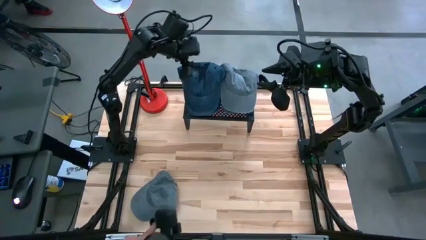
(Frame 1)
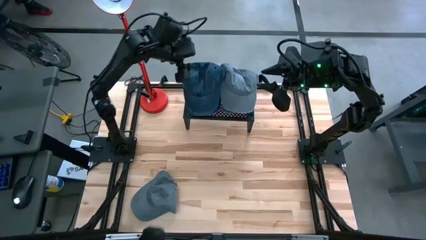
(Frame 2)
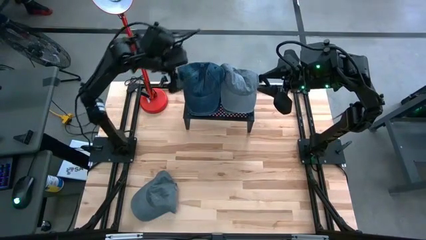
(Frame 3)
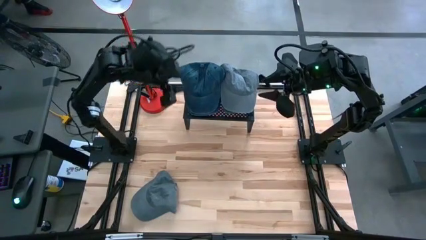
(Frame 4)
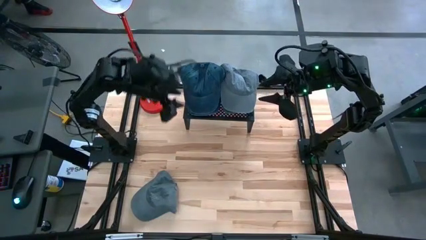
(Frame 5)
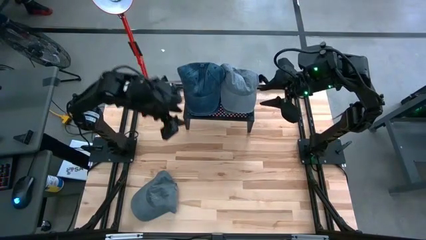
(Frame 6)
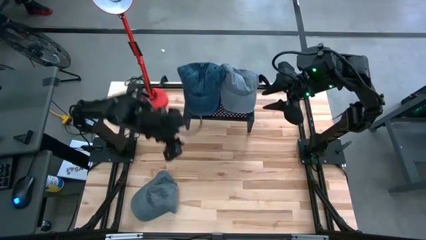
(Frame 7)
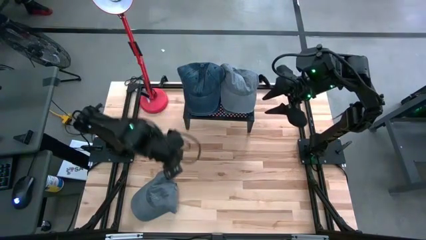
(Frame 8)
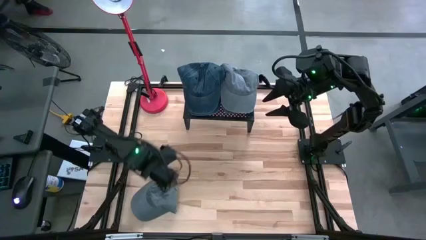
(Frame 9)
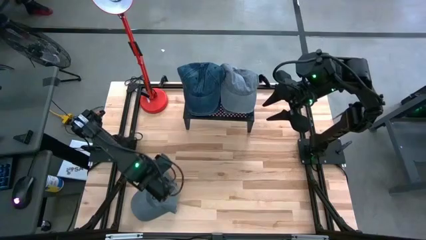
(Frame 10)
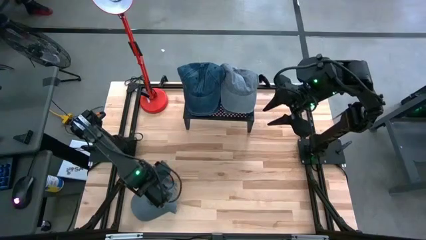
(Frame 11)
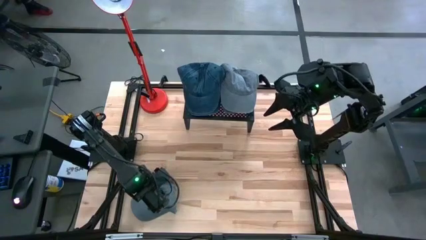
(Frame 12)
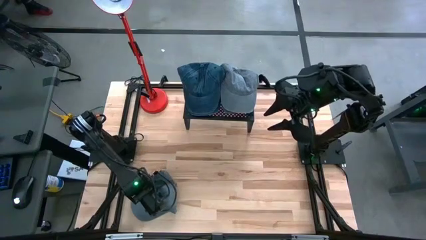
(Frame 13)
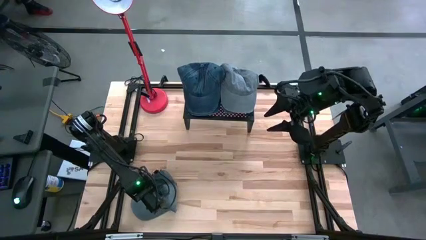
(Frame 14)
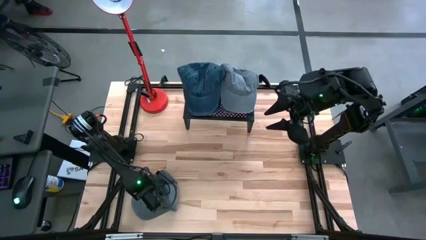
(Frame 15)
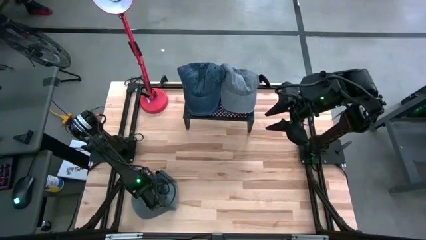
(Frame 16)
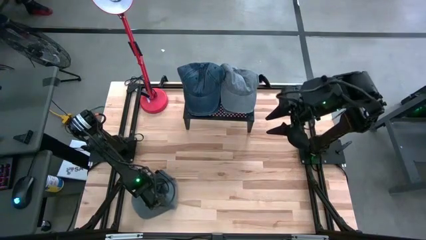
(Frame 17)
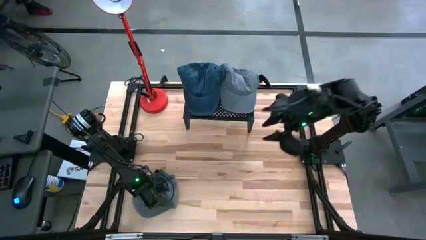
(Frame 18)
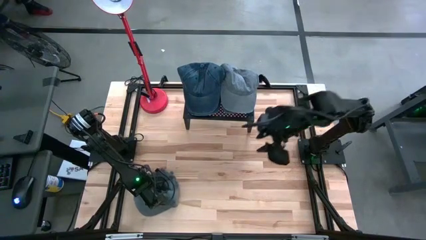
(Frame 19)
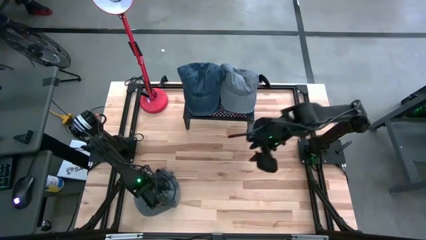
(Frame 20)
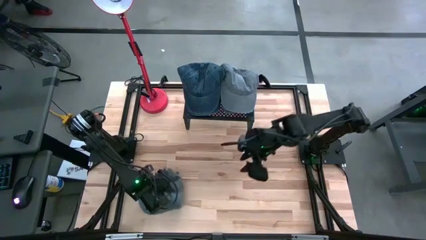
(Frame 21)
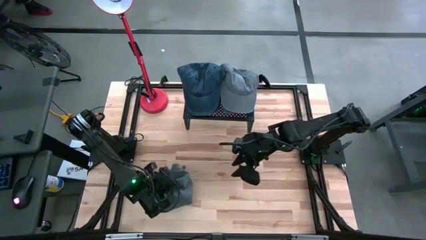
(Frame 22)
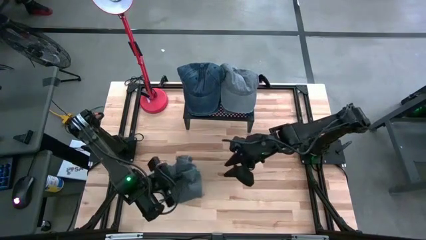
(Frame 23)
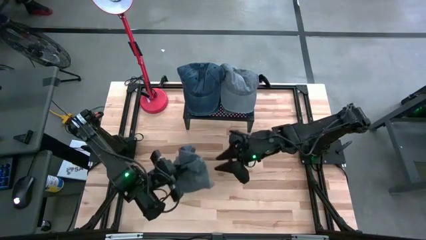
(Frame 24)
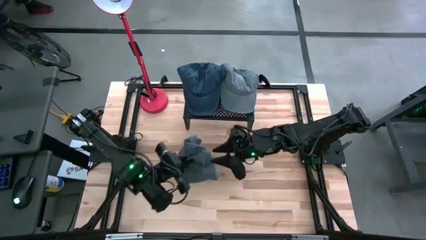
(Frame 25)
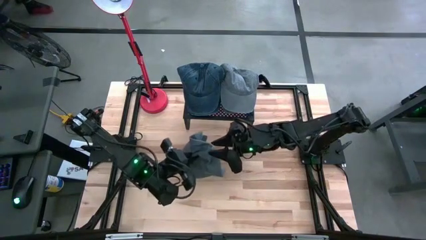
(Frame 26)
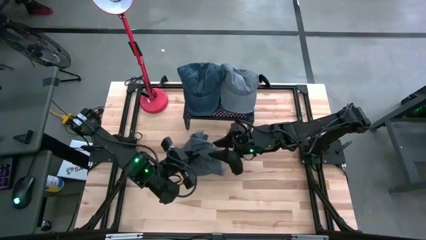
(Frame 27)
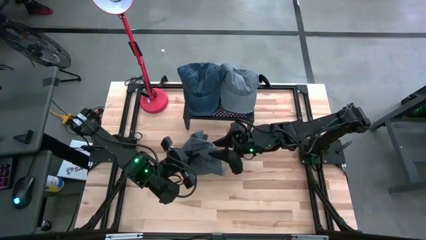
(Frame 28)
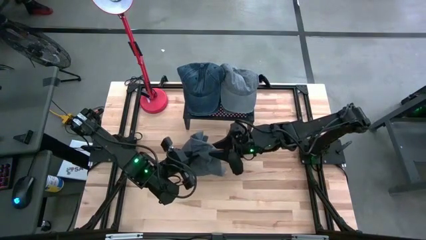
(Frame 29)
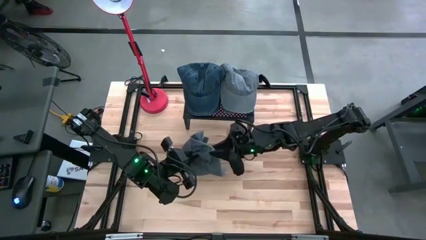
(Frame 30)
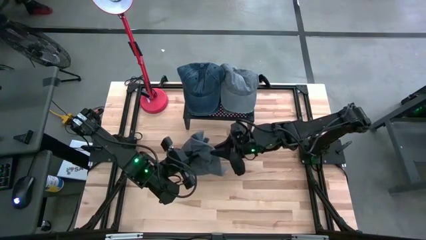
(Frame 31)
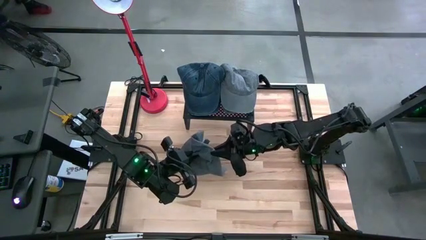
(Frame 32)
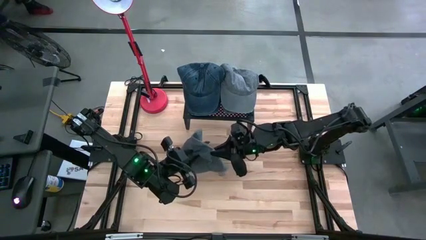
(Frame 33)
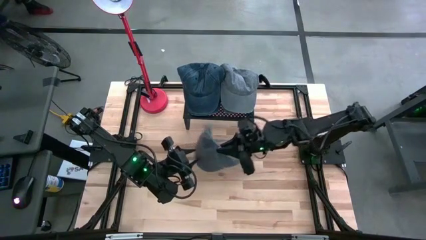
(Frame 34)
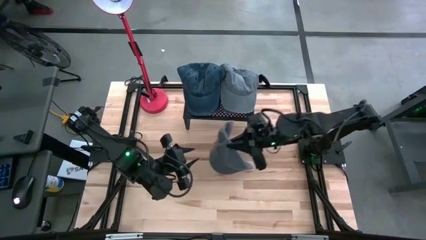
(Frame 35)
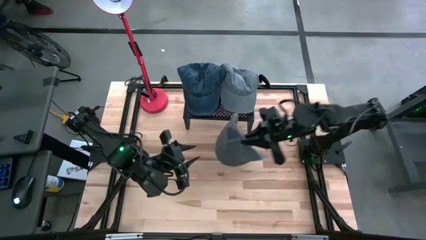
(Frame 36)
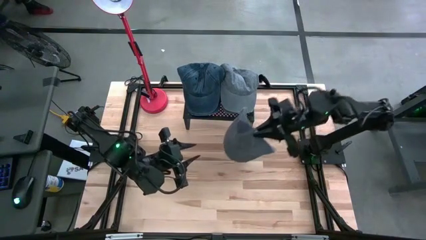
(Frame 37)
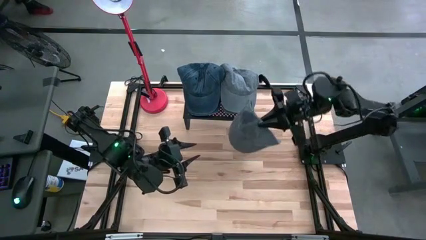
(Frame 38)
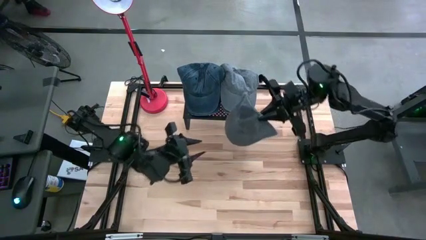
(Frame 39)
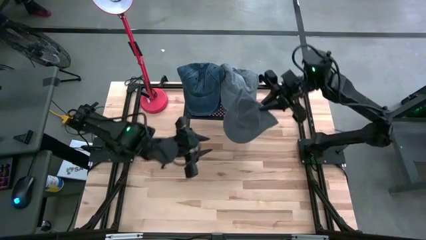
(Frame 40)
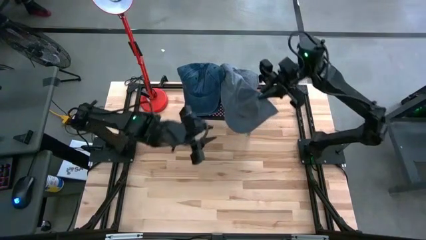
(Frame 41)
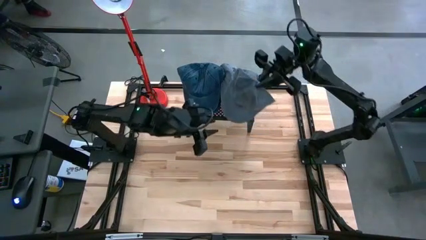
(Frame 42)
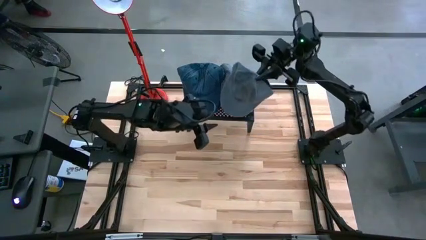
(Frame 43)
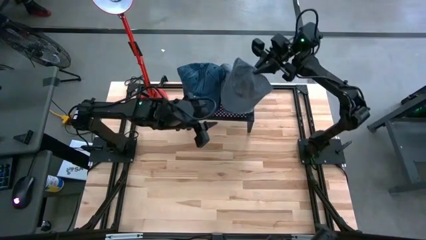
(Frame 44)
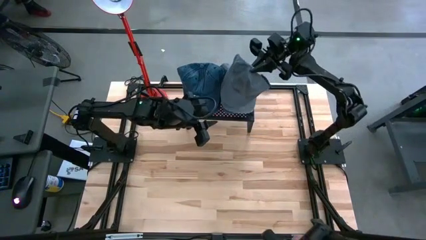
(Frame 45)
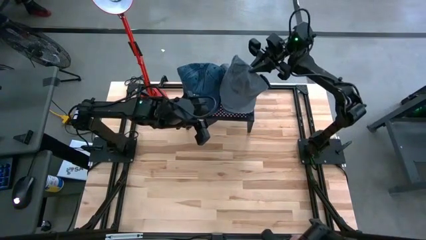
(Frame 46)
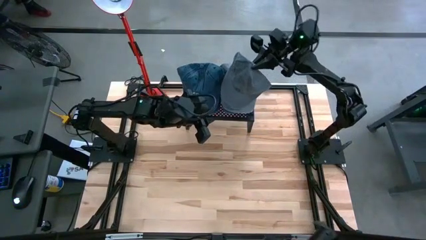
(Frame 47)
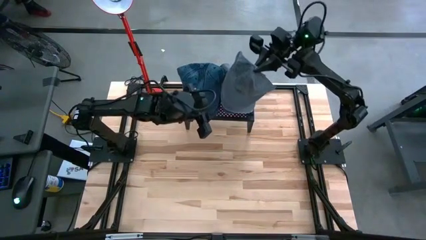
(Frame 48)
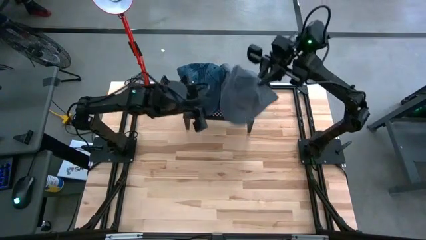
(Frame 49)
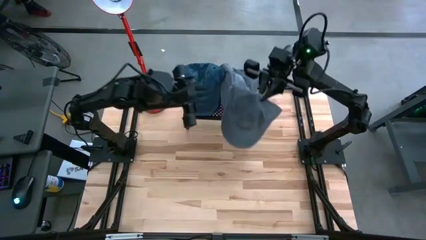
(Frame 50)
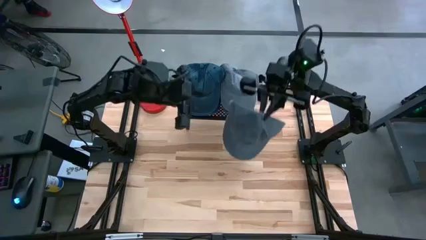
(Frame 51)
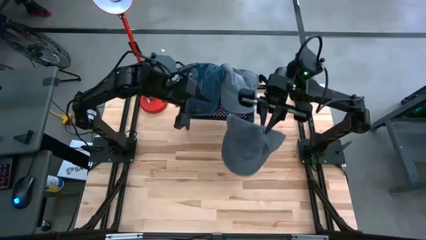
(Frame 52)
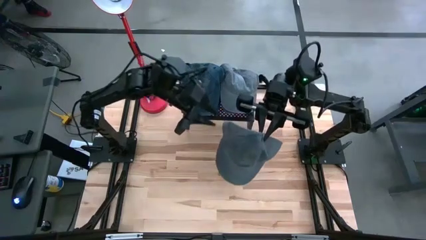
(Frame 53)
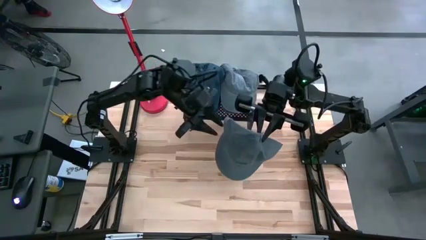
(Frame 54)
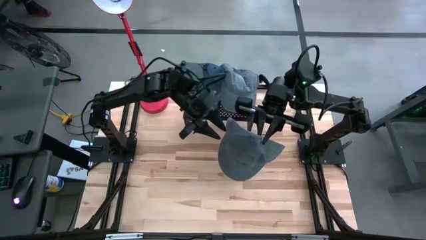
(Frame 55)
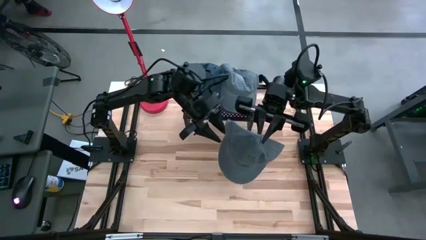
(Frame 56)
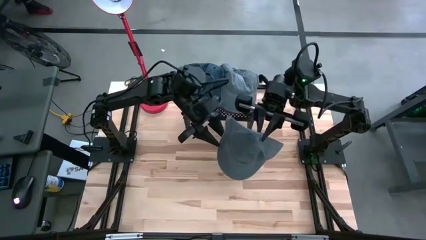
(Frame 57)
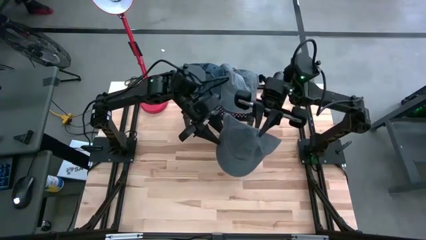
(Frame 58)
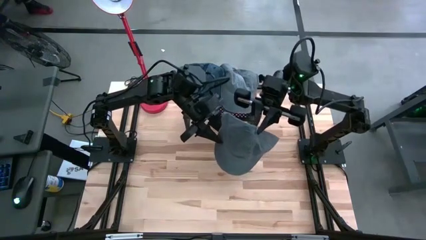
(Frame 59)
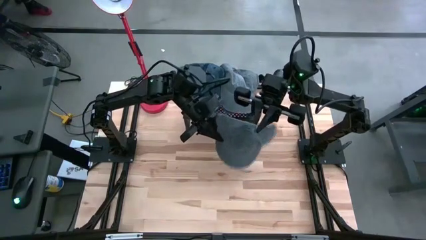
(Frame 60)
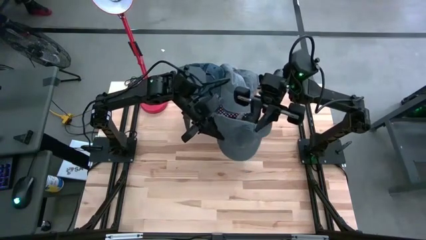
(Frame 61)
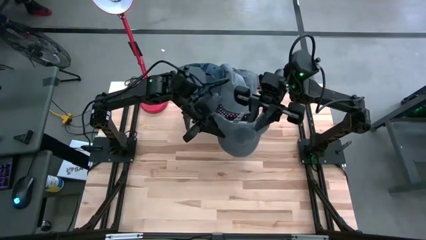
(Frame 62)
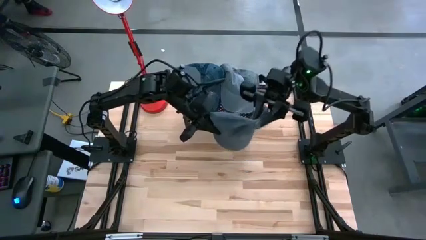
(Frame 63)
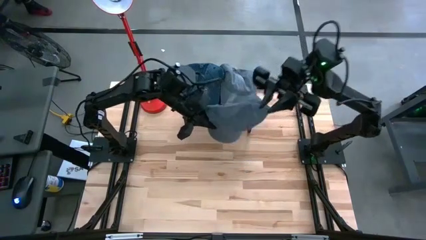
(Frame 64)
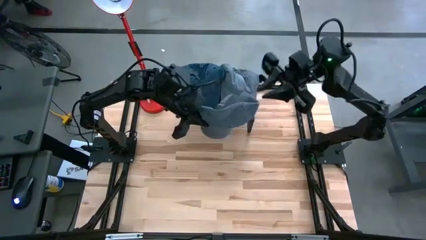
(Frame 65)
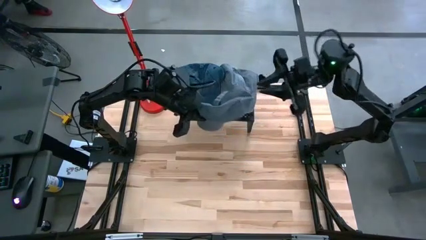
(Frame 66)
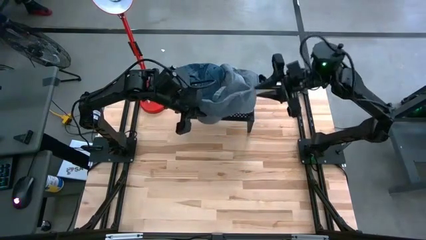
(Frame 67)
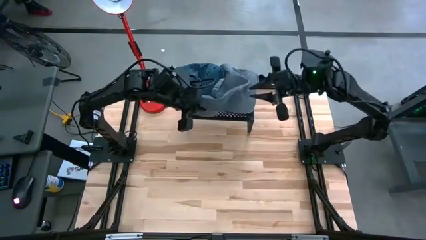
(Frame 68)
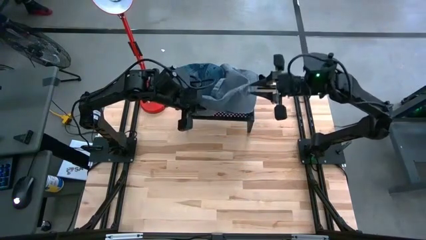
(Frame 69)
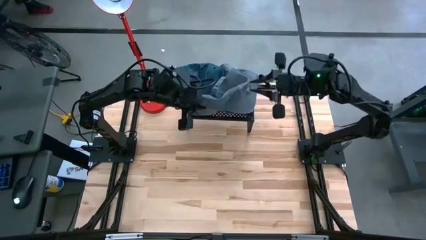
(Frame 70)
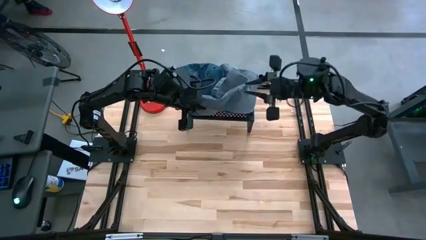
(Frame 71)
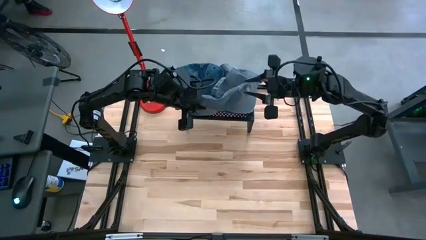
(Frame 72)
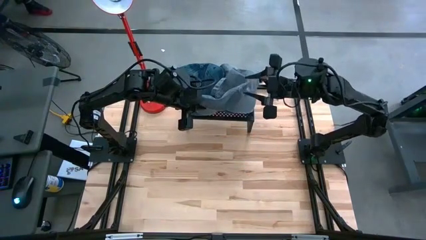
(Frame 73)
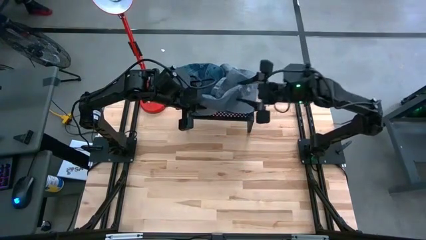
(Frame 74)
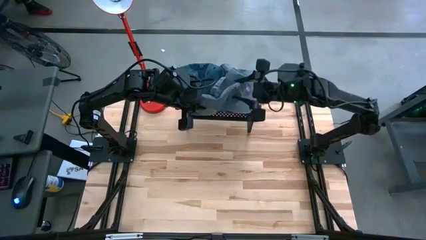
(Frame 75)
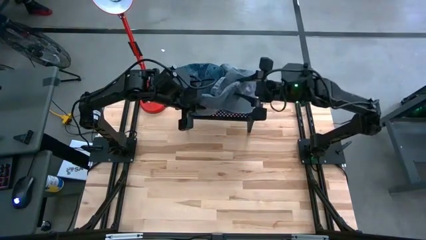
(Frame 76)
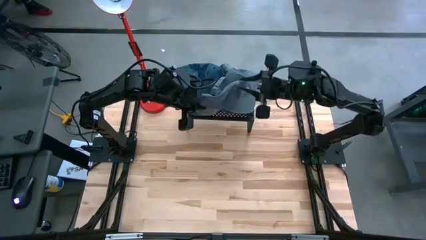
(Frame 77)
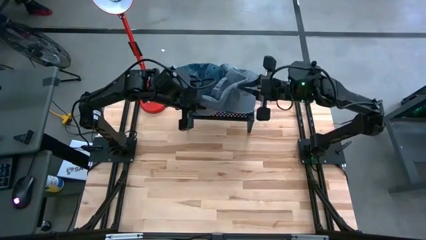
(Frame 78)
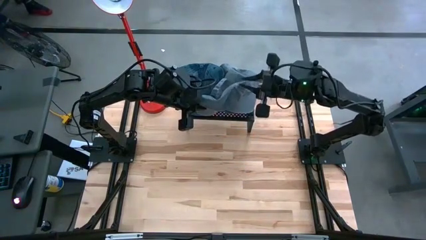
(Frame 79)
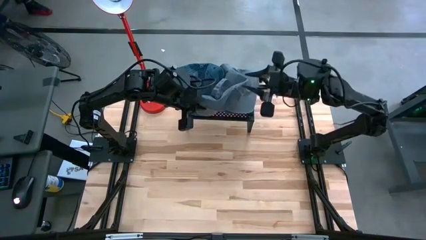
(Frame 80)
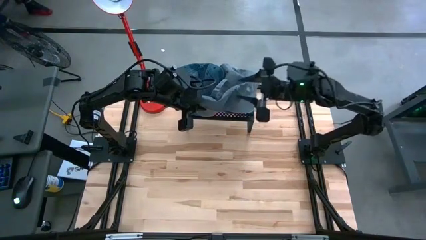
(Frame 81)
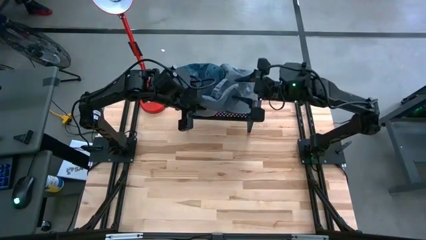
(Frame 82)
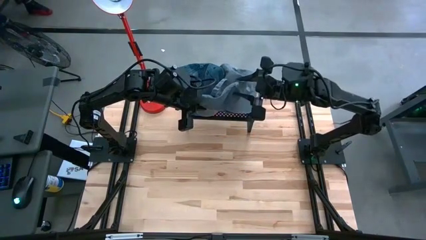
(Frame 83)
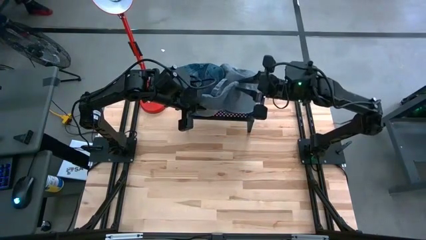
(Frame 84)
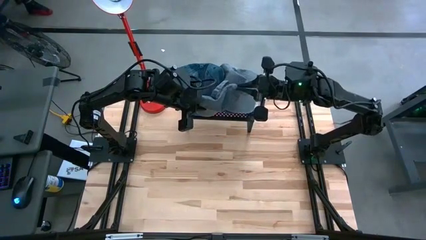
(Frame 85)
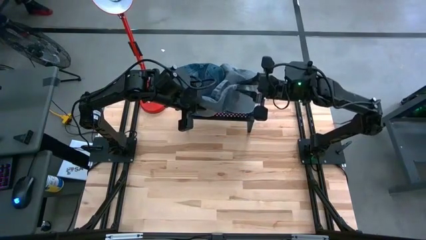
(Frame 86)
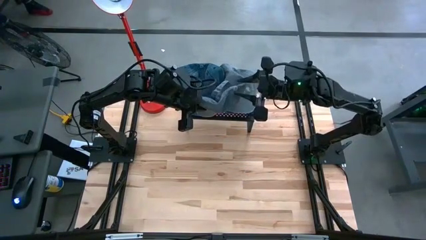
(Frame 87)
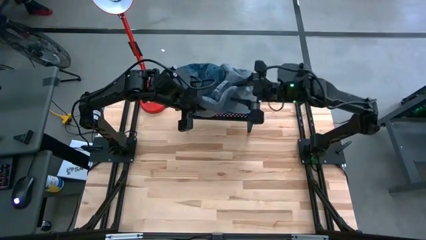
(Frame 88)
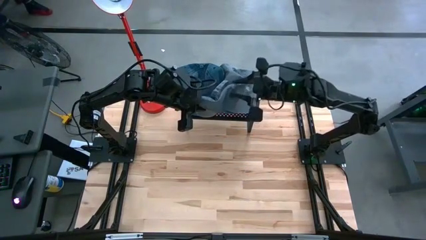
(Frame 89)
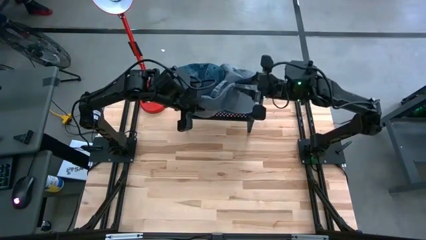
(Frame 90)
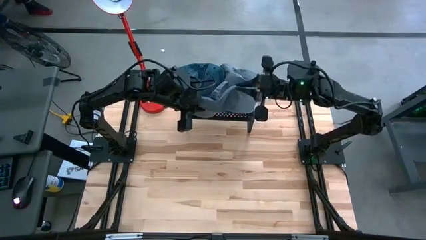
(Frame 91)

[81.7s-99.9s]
Task: Pick & Place hat
Stack the gray cap on top of the gray cap on the shelf
